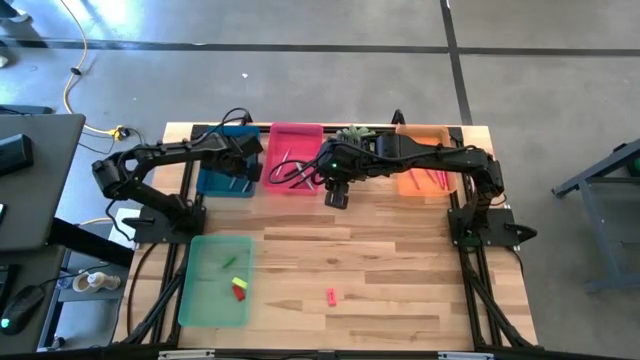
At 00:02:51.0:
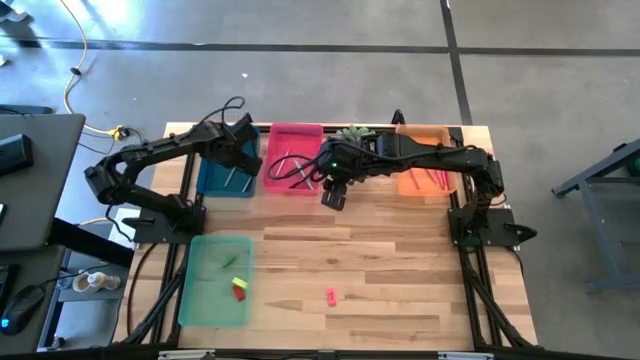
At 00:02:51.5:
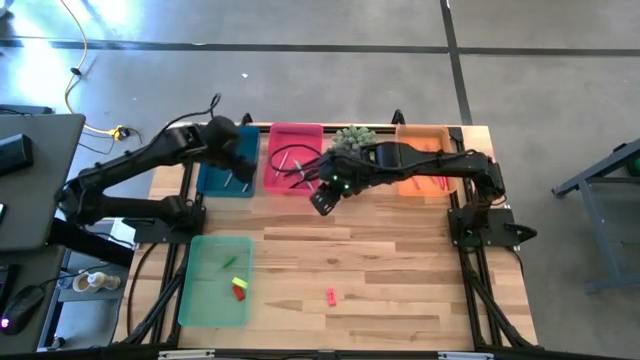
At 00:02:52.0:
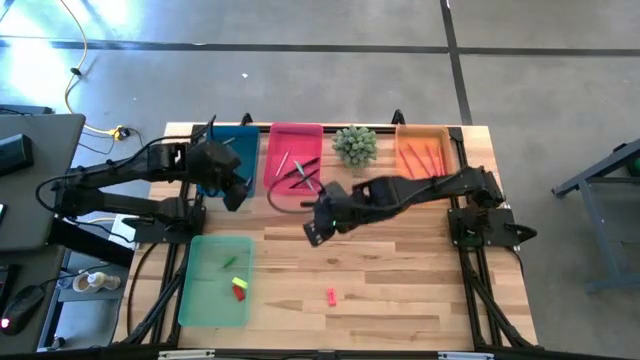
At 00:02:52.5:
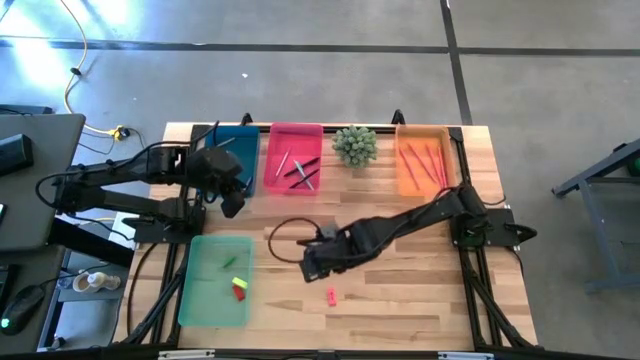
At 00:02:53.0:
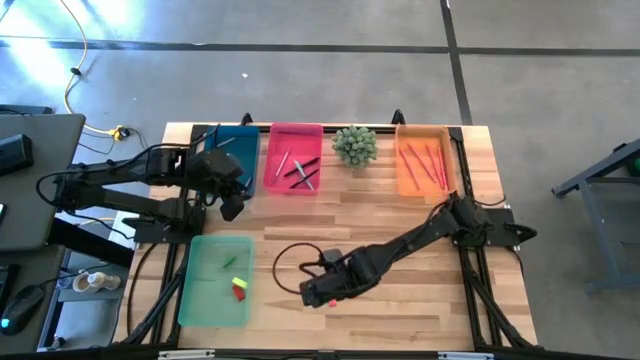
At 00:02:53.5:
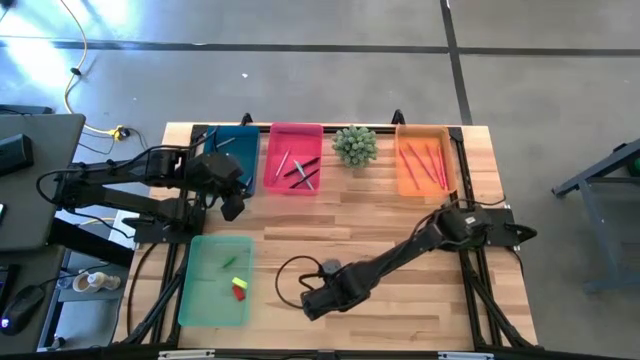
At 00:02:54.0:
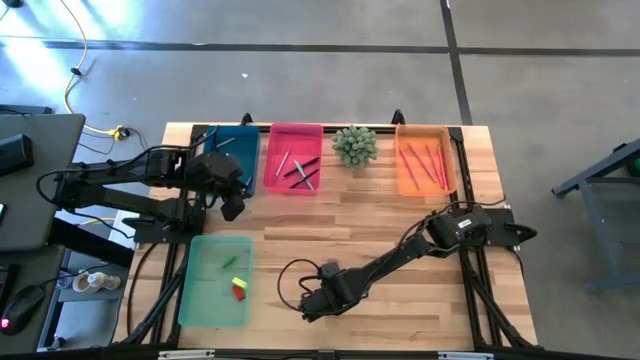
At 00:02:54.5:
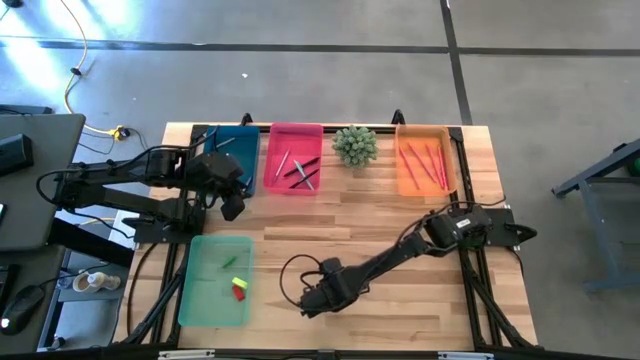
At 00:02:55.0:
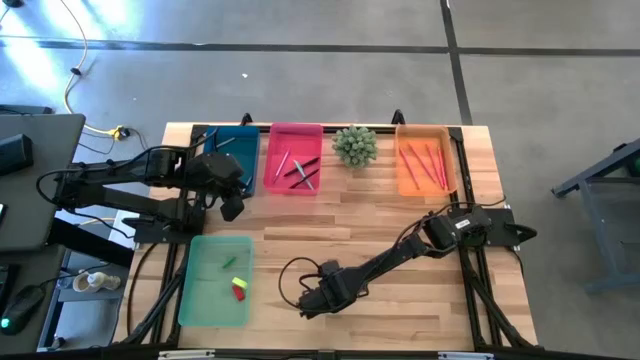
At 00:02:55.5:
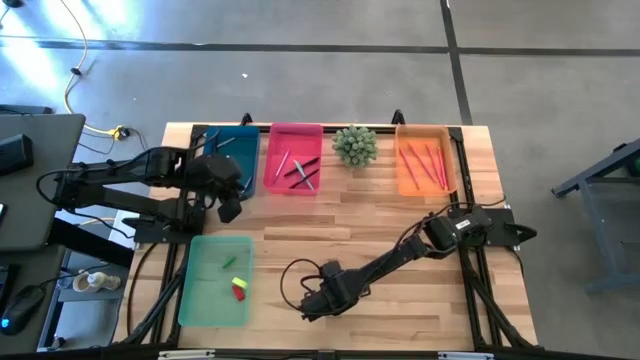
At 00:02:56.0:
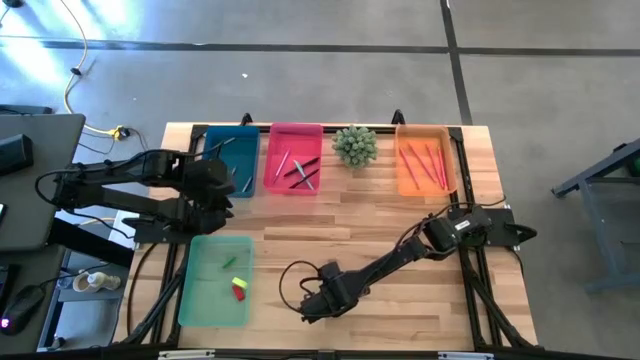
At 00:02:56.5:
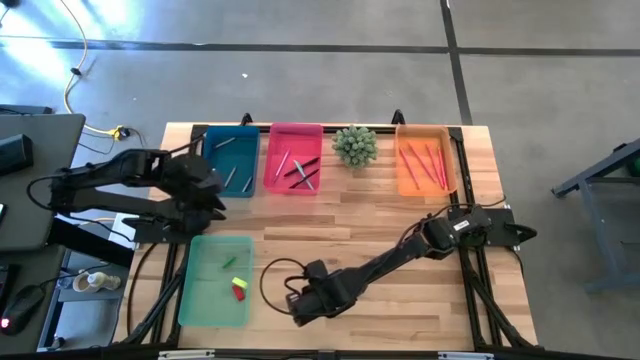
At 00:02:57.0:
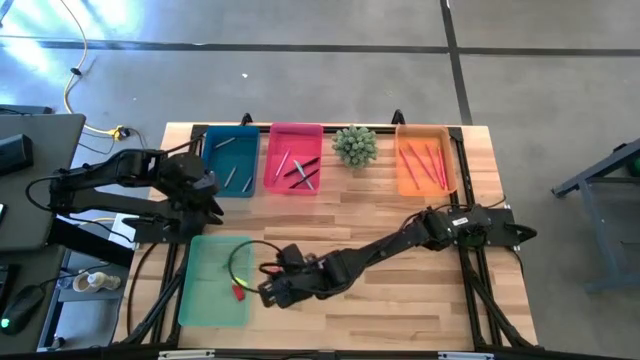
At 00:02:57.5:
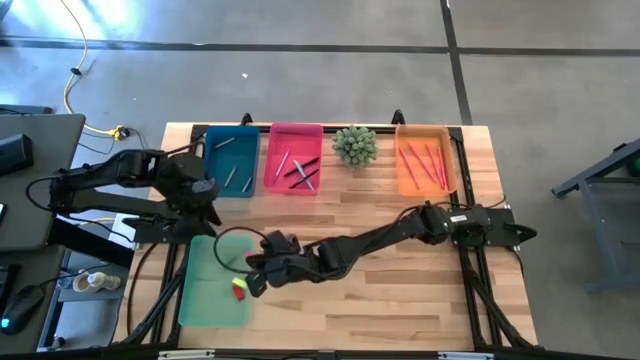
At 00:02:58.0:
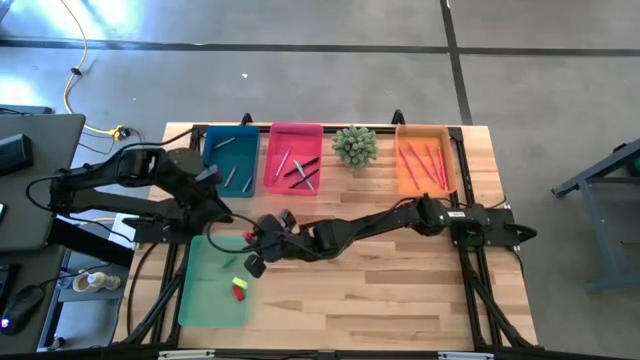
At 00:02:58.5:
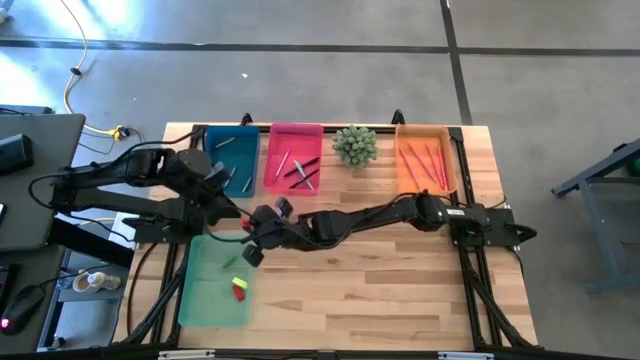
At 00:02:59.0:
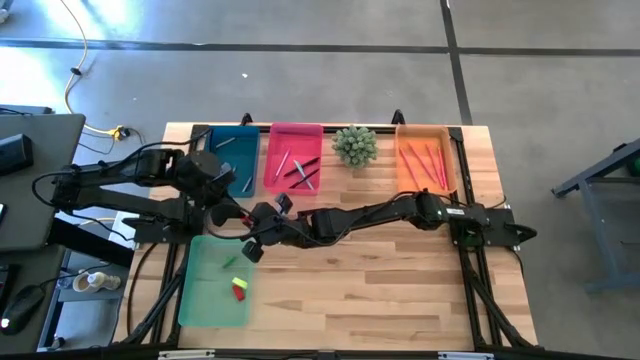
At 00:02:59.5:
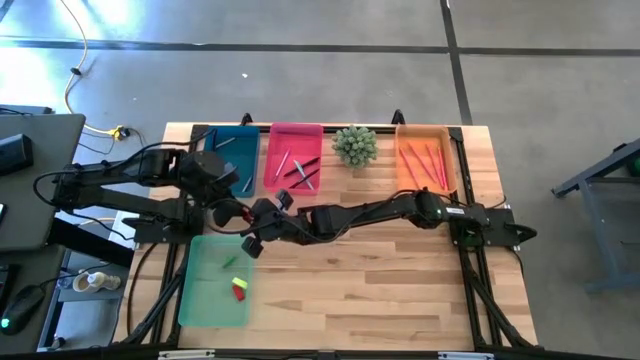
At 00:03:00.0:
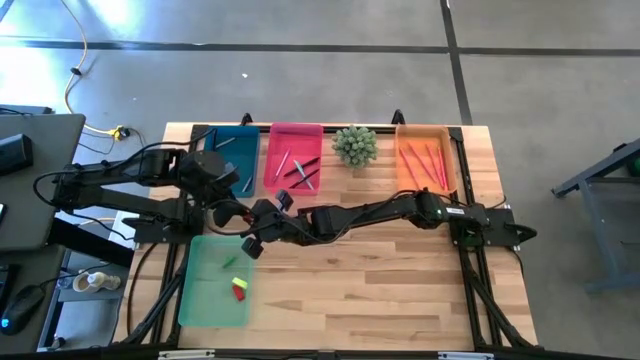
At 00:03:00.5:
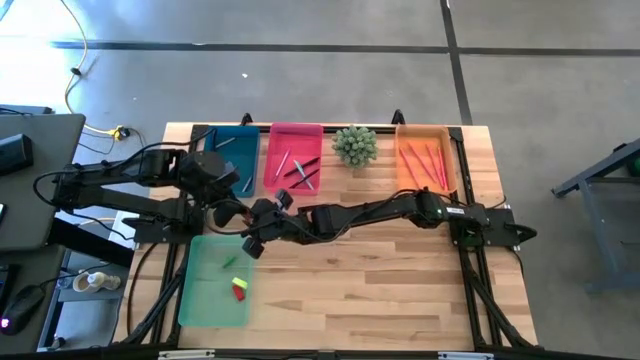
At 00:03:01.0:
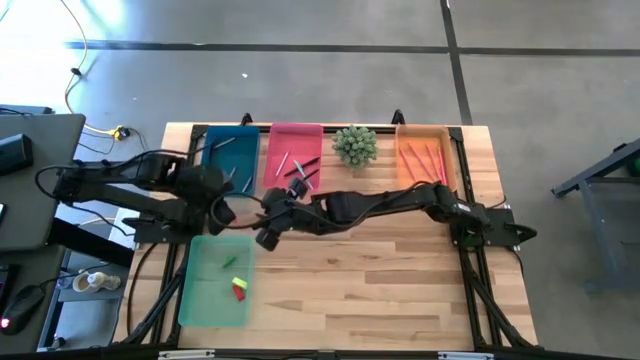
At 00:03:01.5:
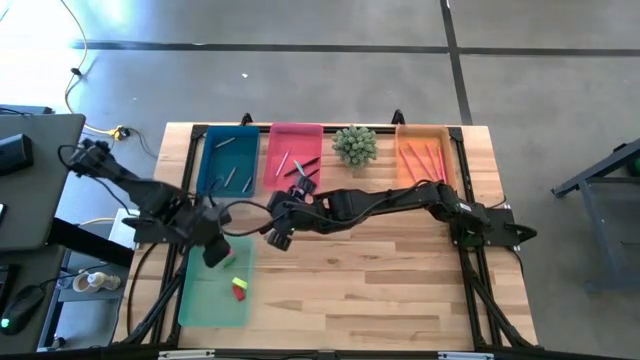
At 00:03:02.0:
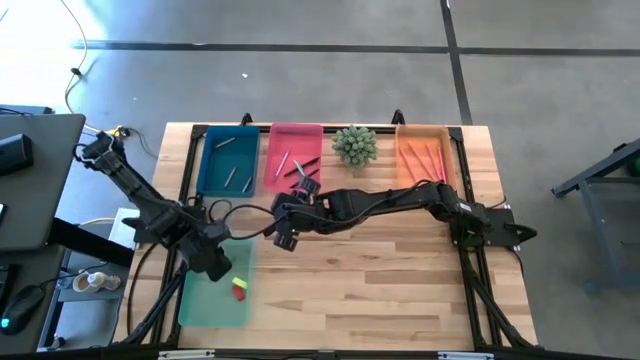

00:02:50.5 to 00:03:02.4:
Task: Sort crayons/erasers/pens/pencils in bins
Put the pink eraser into the green bin

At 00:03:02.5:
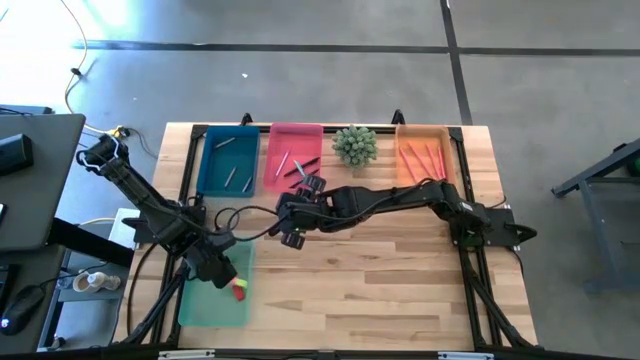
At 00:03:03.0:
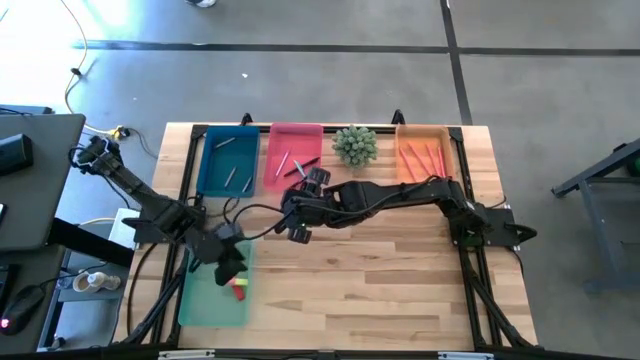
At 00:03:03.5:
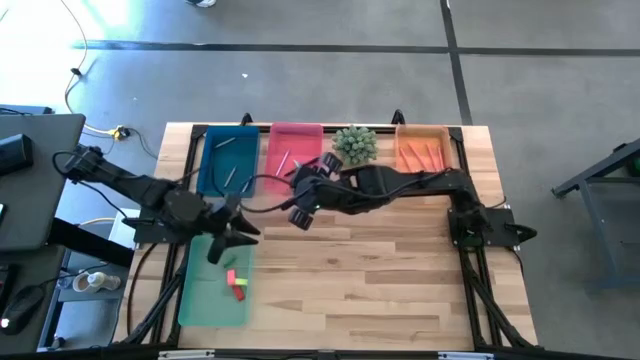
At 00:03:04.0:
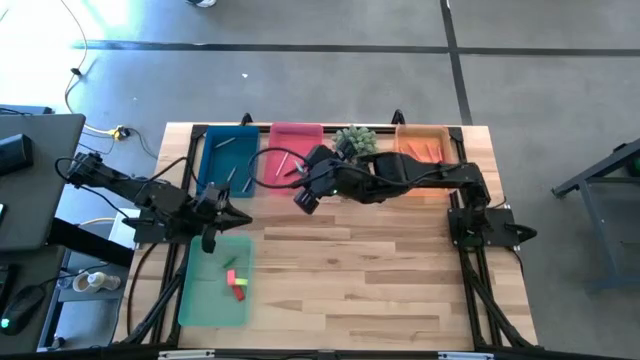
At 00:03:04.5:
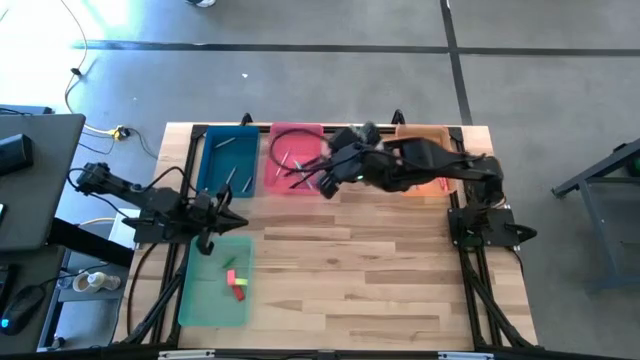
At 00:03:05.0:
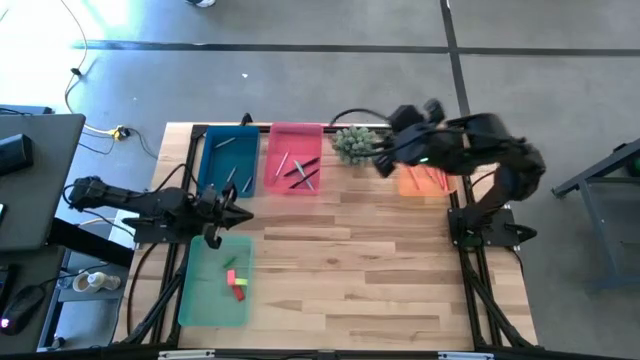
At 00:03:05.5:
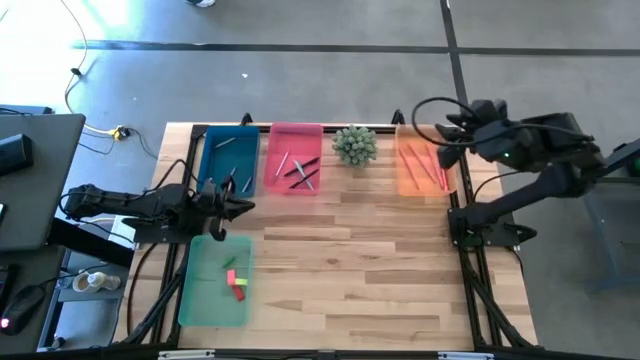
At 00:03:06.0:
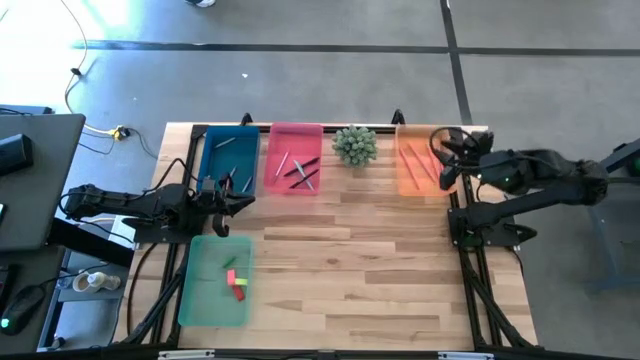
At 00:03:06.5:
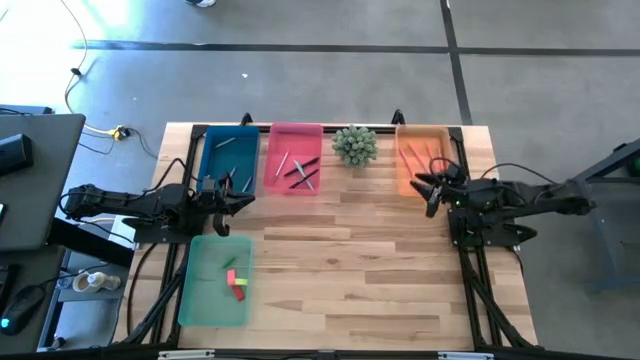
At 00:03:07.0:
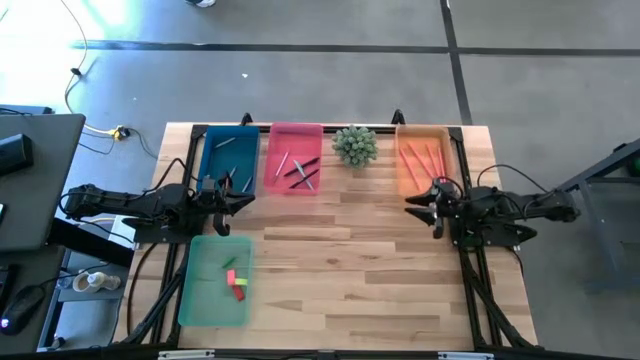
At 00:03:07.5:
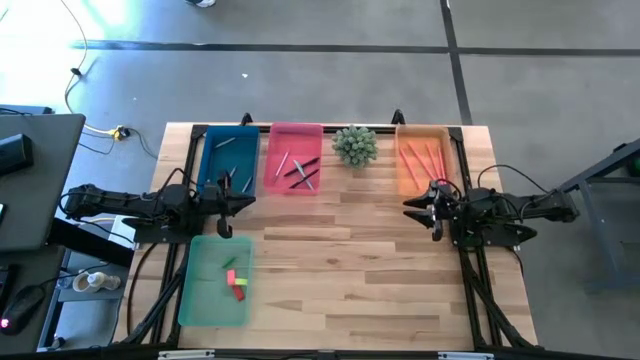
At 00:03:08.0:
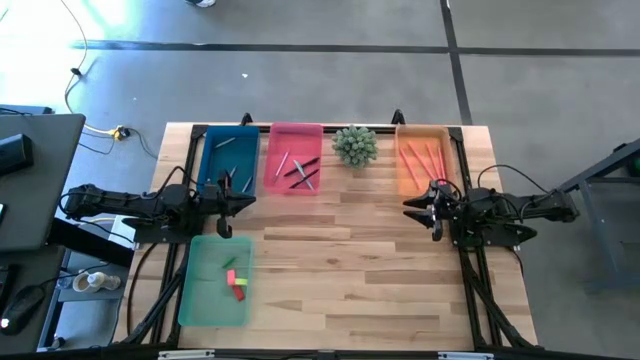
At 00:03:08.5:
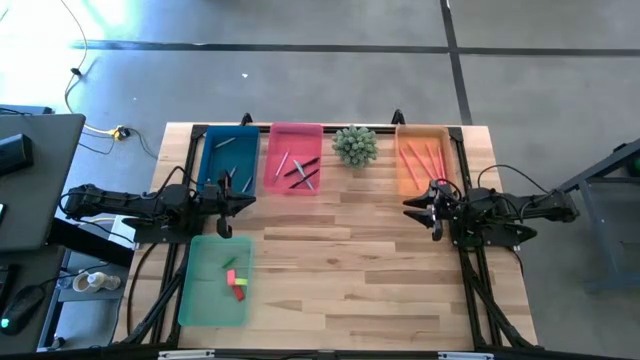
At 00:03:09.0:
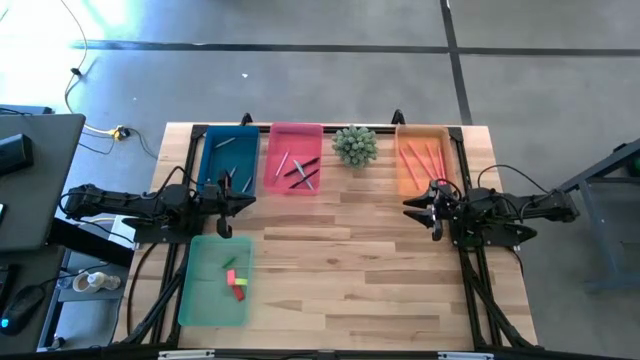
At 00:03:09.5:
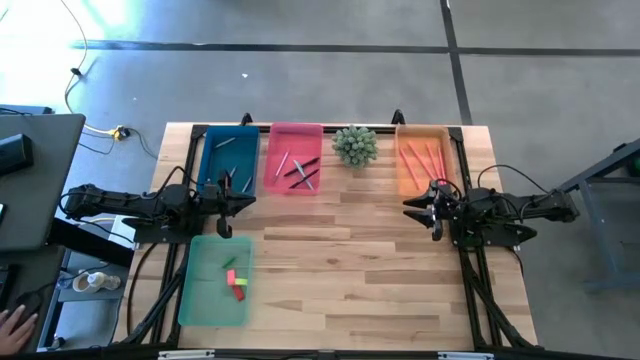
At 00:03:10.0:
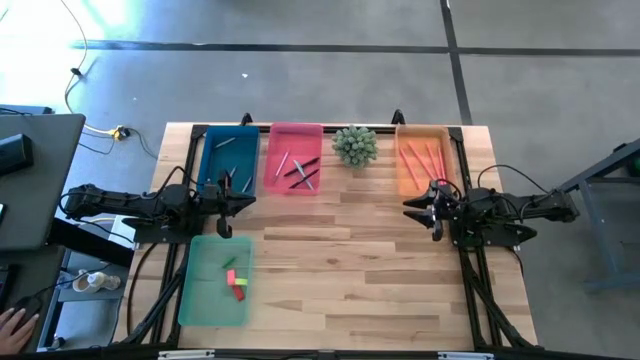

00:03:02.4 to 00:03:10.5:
Return to Home Position
